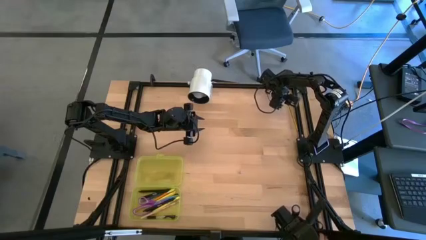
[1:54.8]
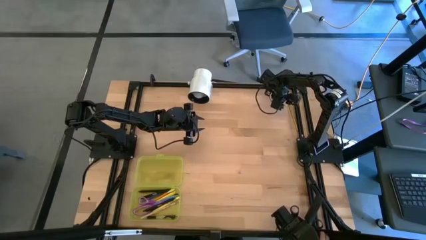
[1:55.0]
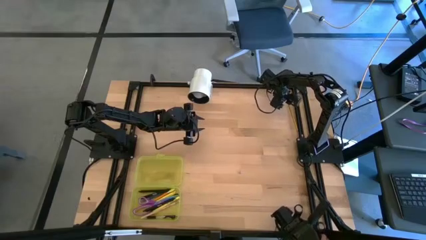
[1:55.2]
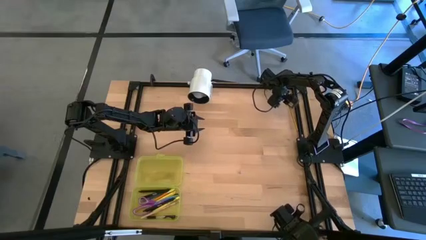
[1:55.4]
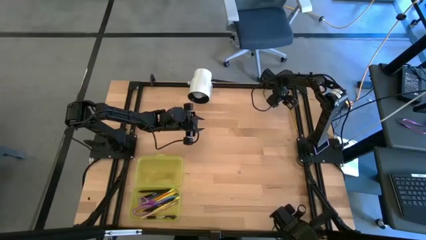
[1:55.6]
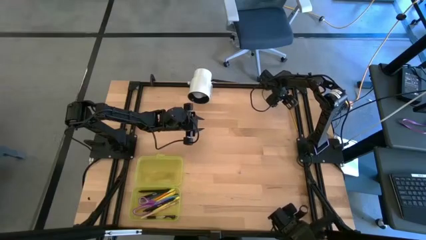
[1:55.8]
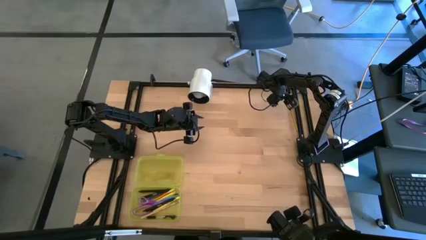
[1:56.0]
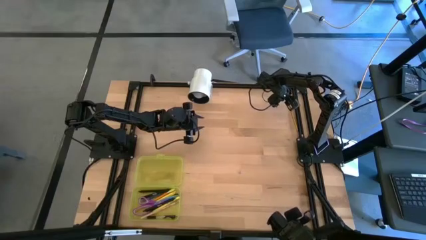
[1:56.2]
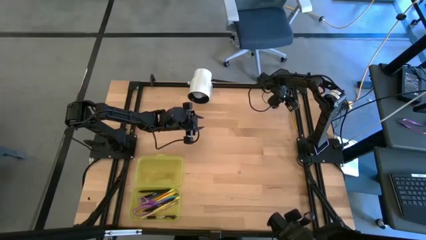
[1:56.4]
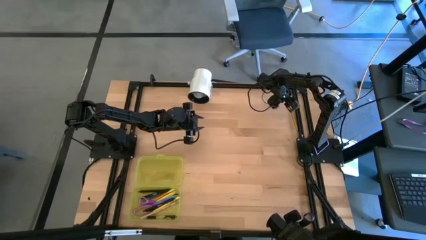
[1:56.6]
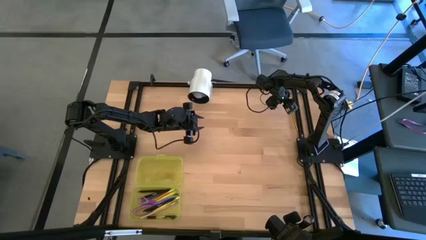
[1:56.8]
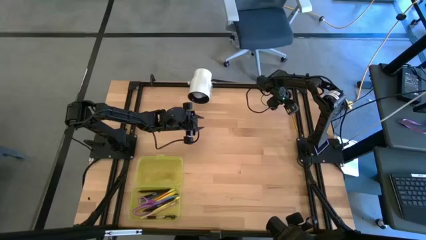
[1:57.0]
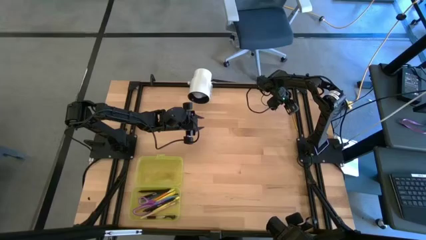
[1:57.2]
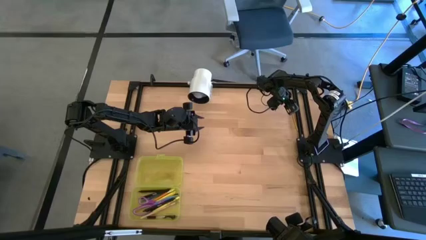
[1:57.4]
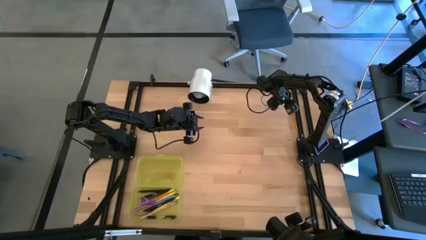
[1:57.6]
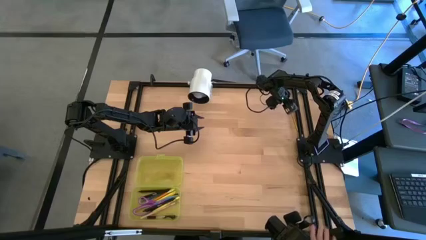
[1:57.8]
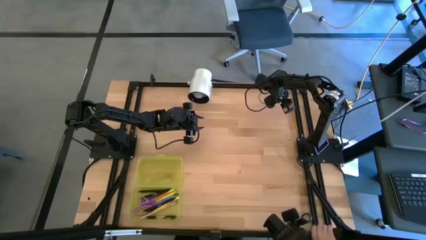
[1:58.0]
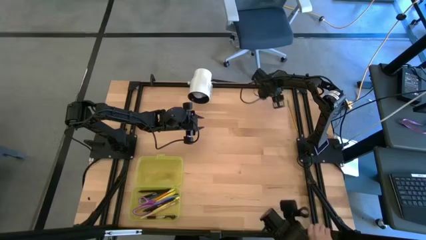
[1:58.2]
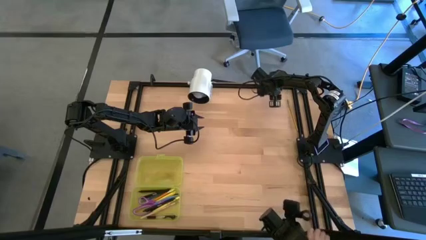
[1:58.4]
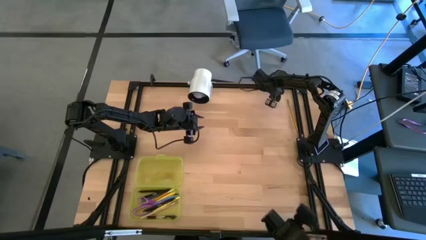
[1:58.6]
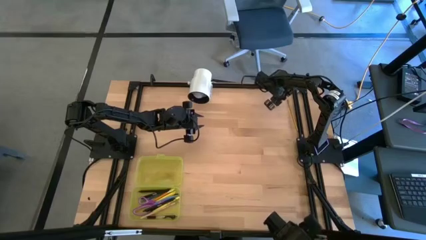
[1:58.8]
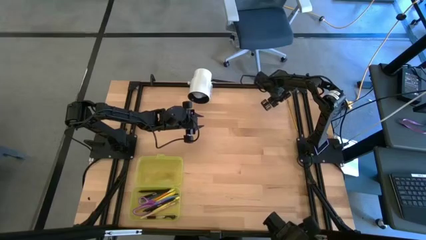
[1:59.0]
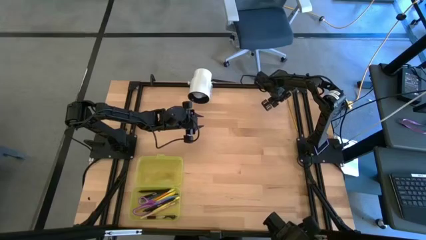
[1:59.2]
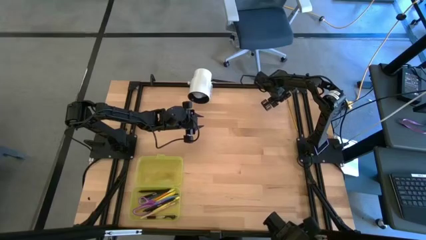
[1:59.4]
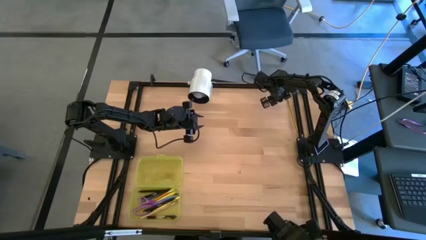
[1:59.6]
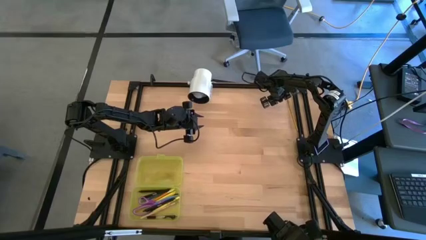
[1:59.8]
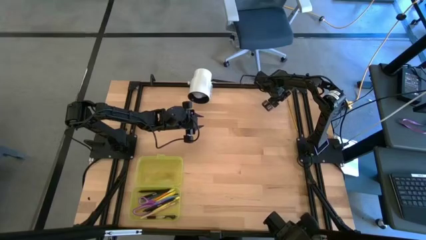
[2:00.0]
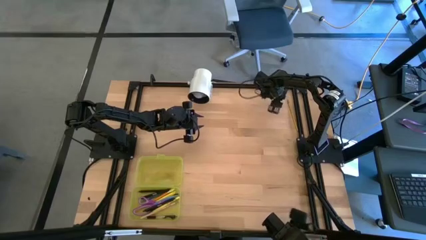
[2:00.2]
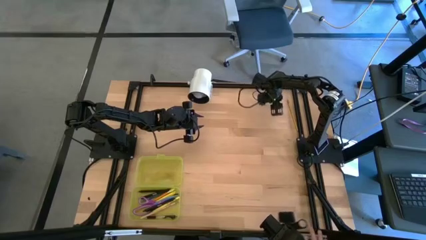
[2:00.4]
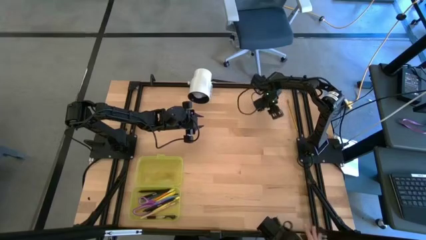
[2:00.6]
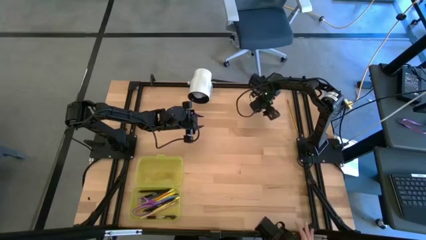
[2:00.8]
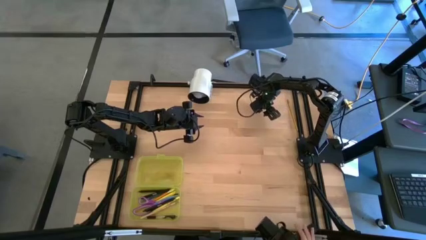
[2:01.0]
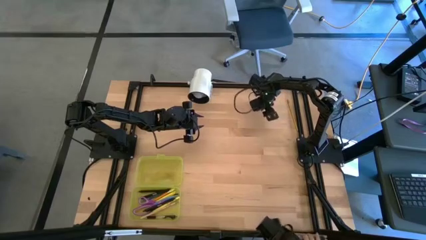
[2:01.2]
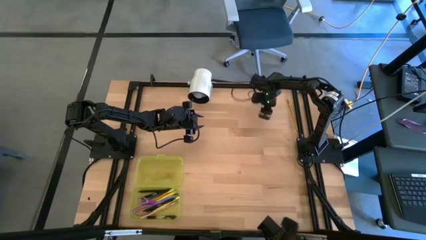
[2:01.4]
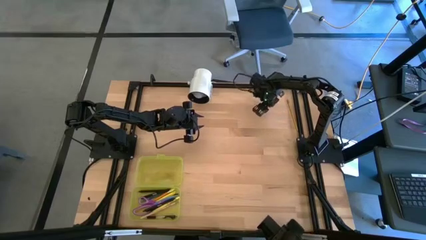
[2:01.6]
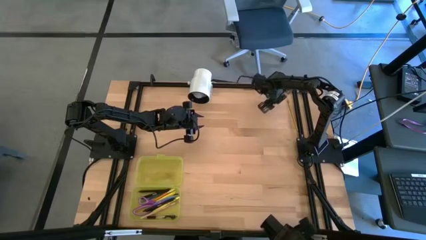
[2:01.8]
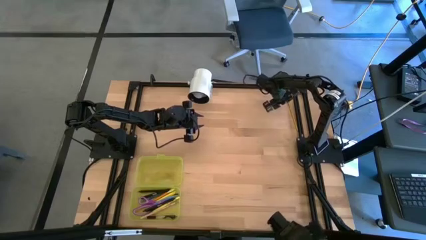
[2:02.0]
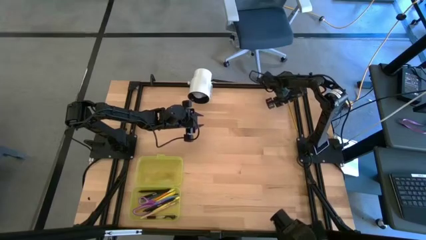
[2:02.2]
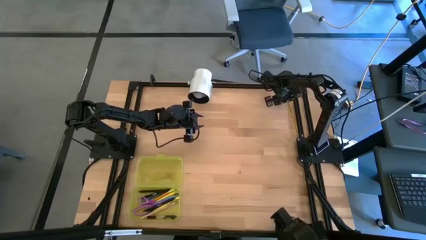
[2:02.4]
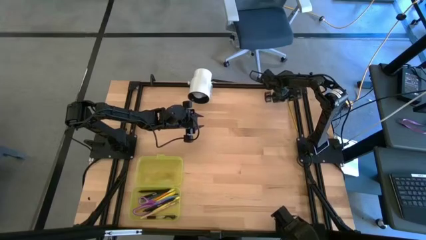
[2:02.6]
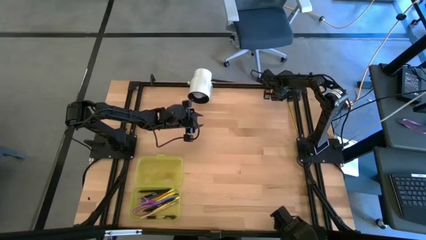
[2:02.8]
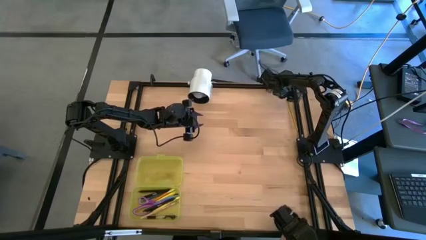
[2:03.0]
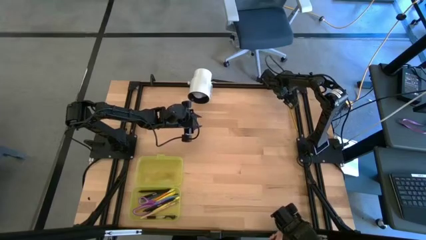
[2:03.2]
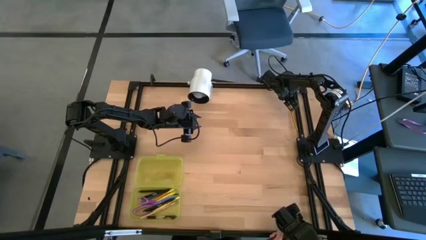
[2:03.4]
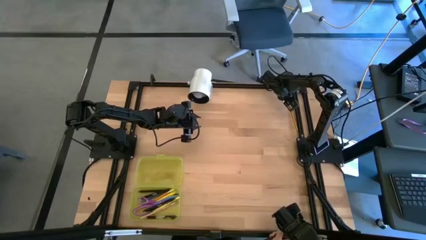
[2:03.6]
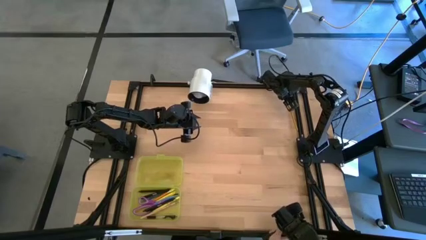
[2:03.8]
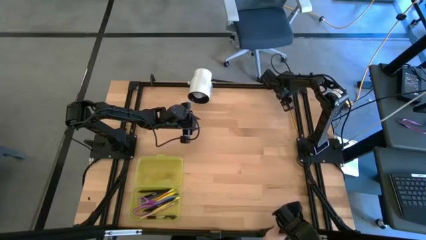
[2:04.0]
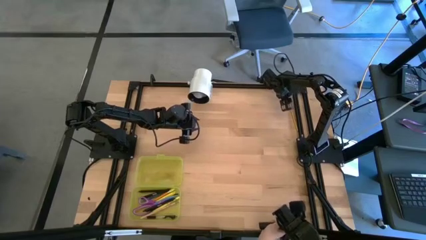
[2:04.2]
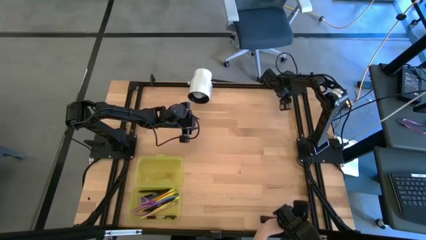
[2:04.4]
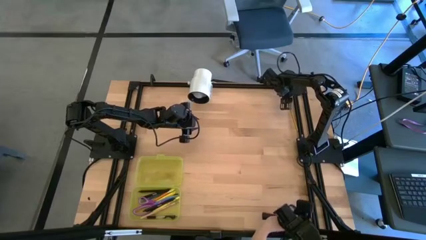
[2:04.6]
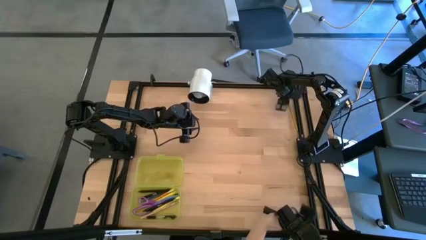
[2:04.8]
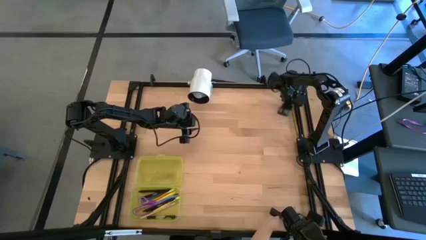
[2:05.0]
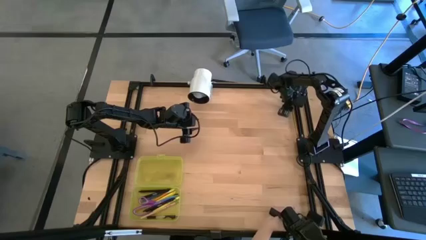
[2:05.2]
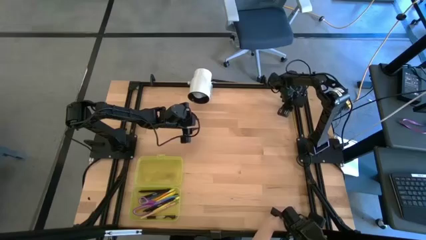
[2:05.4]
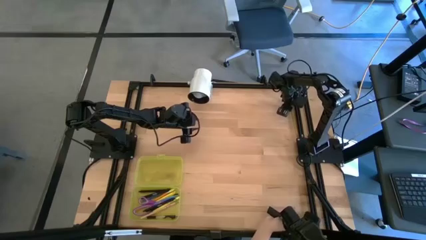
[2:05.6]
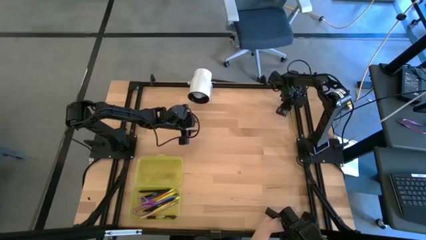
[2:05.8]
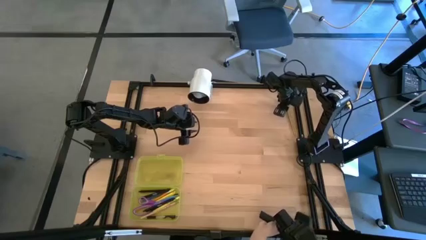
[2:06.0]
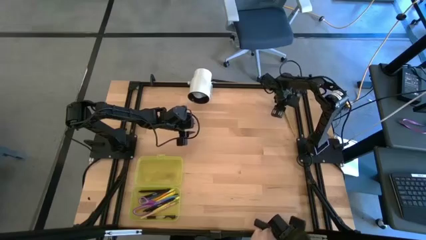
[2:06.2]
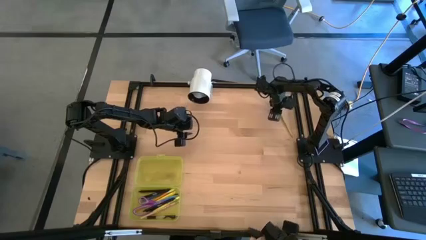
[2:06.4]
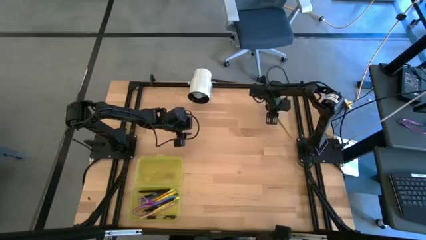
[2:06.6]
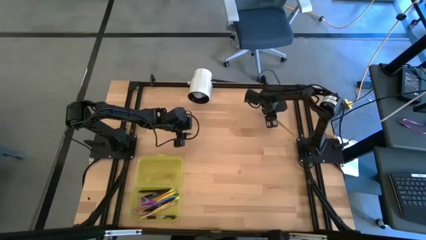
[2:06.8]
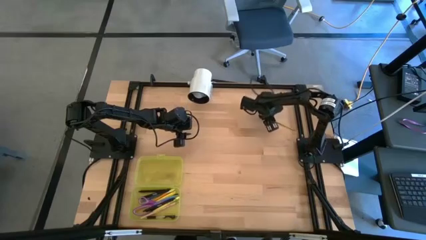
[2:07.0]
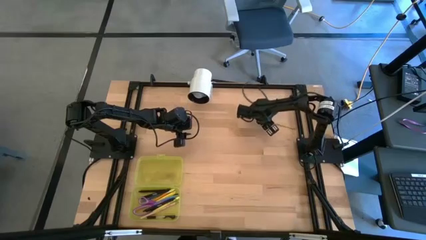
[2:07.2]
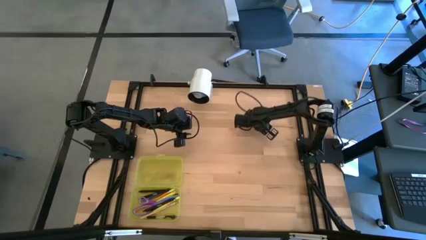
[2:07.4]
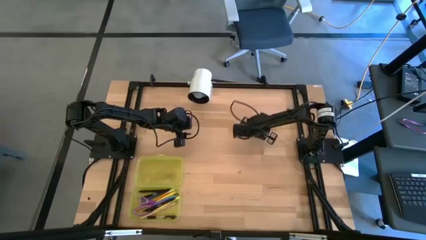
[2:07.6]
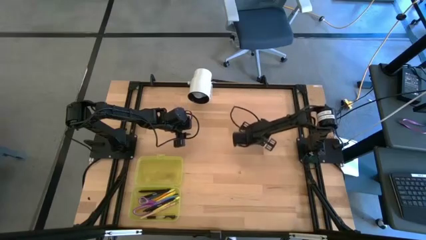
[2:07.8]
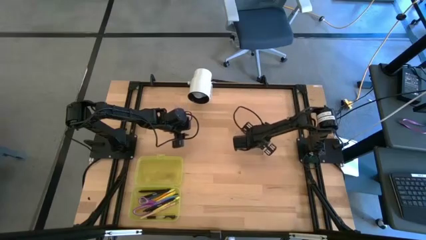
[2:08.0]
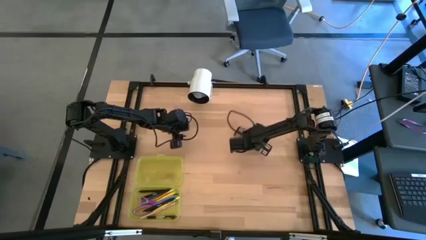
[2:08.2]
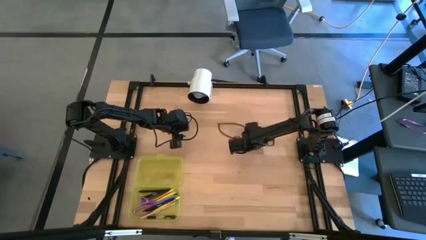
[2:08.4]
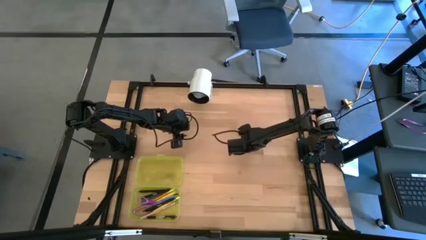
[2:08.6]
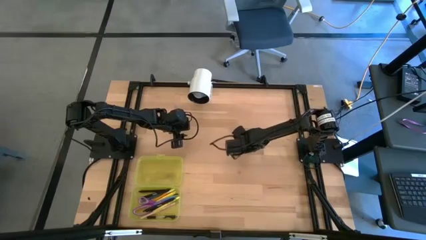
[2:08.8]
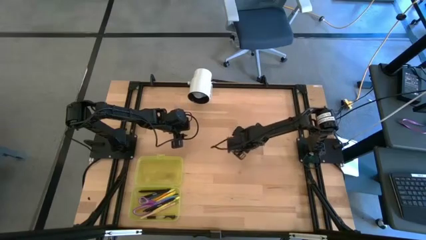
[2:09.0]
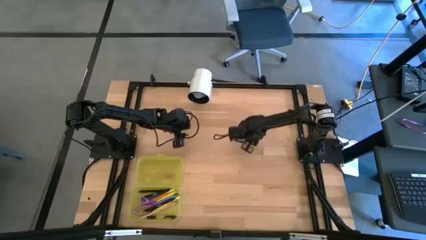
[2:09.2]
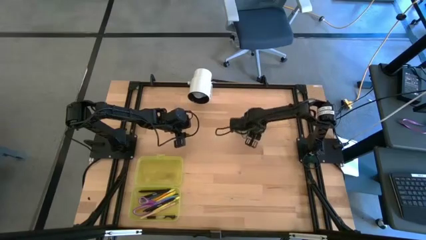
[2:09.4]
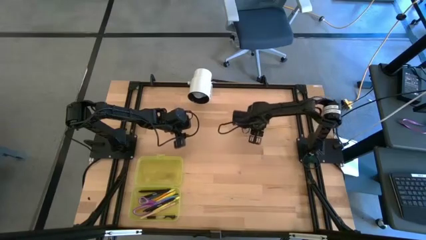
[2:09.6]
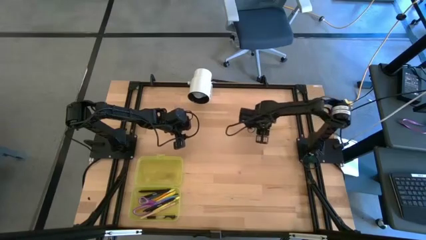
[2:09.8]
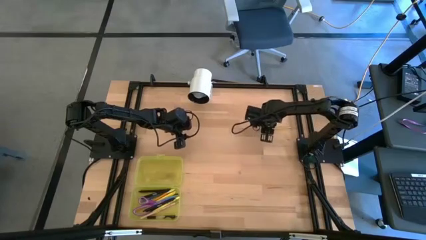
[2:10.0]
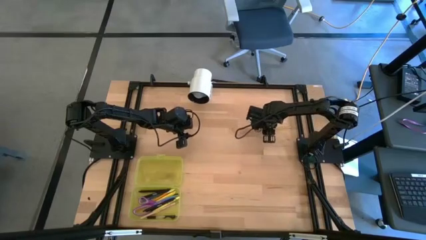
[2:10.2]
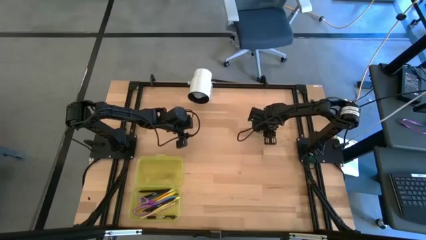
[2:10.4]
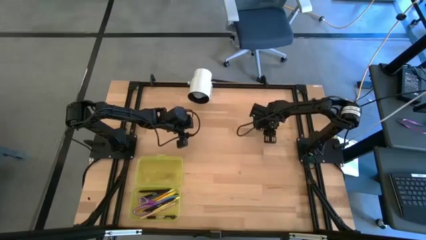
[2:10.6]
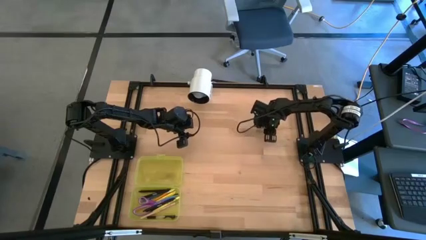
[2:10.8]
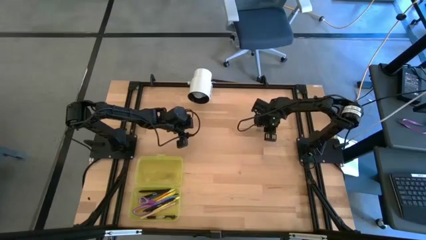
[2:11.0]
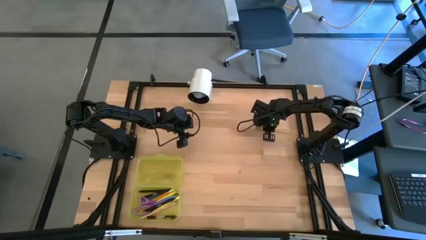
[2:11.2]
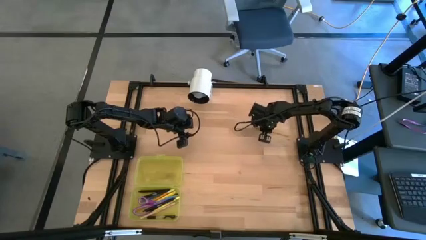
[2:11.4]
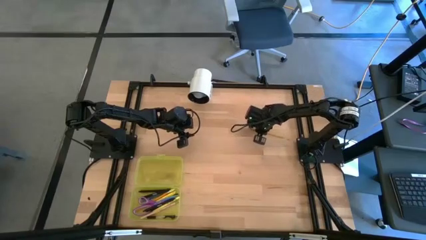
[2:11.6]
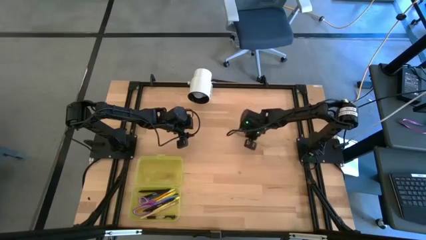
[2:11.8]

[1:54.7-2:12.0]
Task: Pick & place school supplies into a supply box
Put the yellow pencil into the yellow supply box
